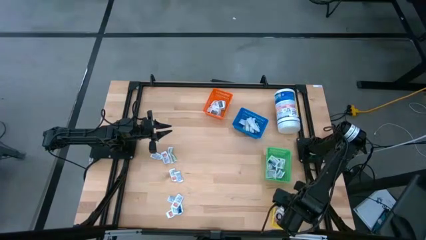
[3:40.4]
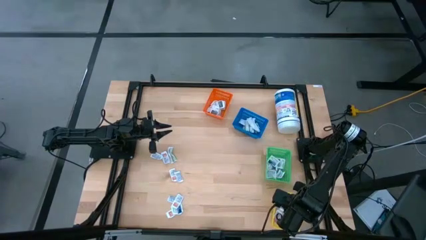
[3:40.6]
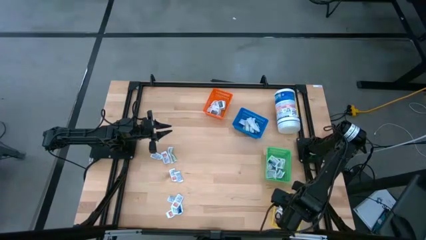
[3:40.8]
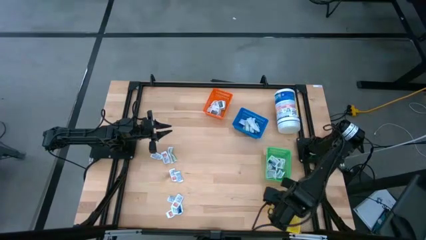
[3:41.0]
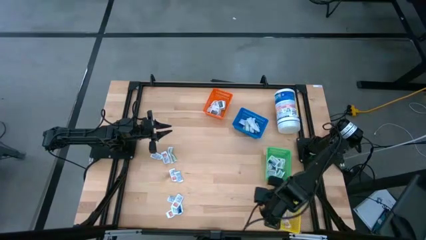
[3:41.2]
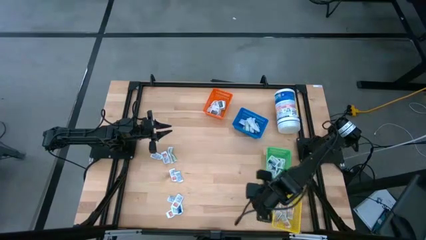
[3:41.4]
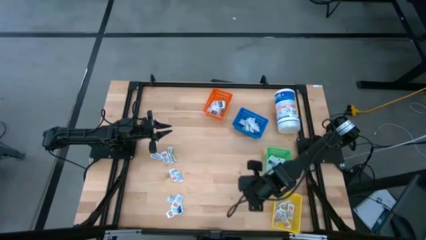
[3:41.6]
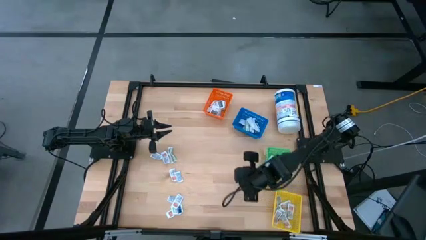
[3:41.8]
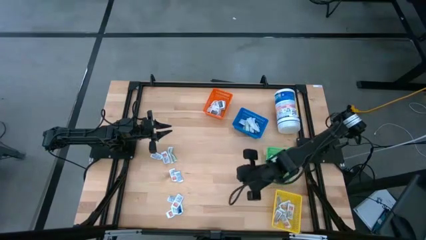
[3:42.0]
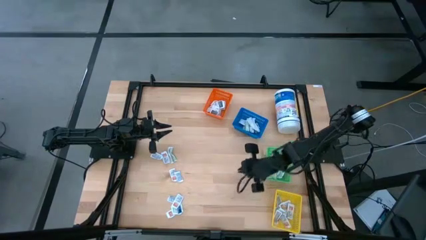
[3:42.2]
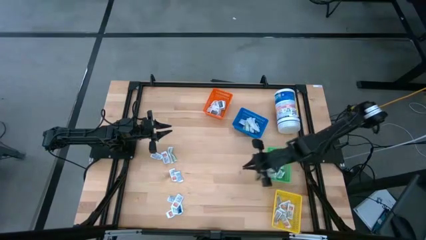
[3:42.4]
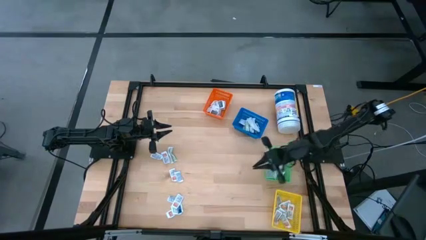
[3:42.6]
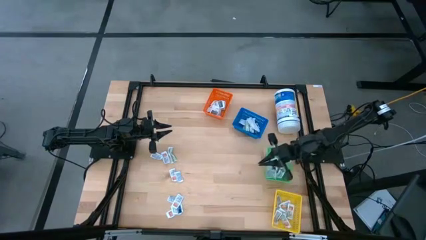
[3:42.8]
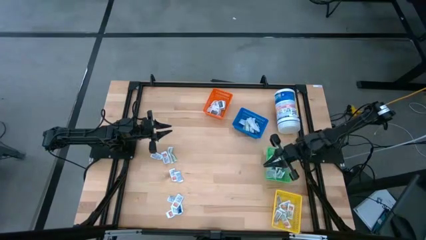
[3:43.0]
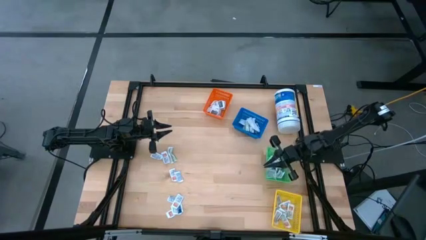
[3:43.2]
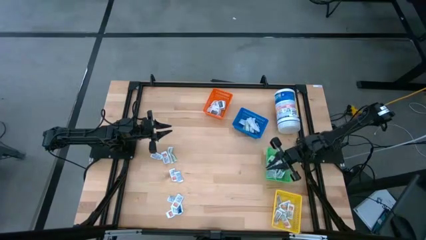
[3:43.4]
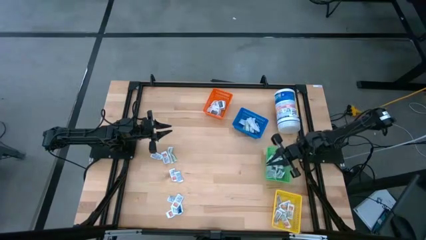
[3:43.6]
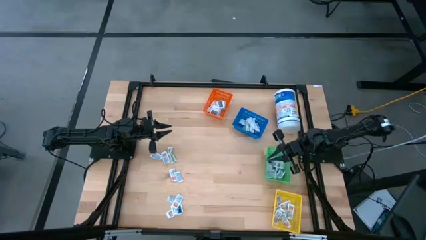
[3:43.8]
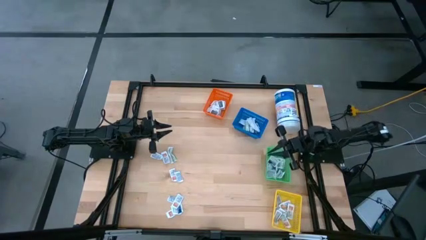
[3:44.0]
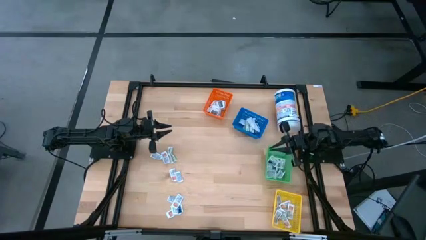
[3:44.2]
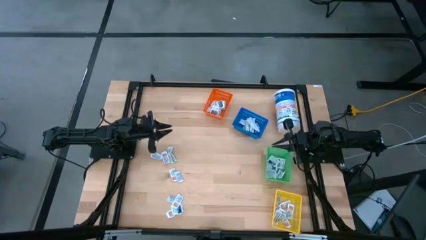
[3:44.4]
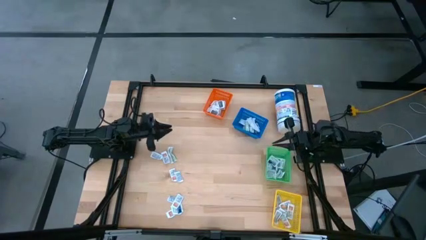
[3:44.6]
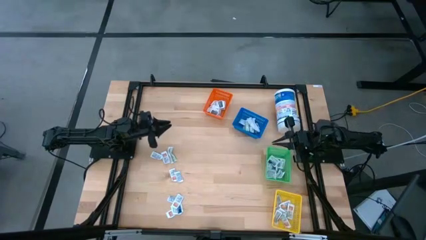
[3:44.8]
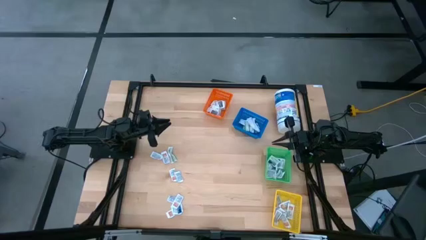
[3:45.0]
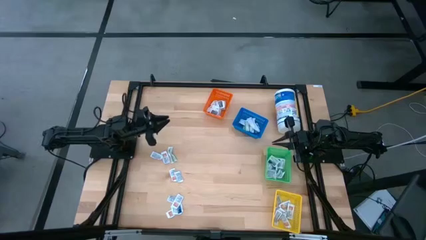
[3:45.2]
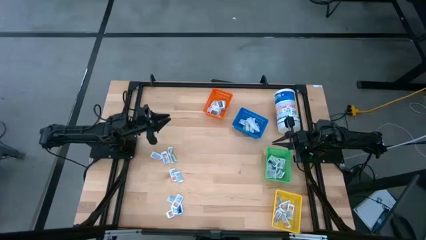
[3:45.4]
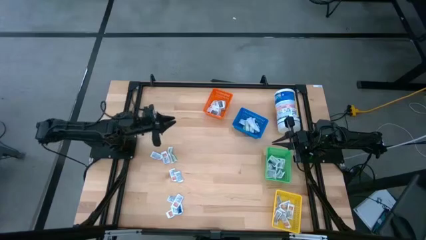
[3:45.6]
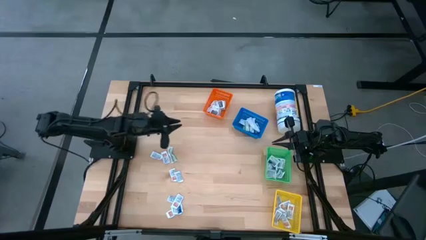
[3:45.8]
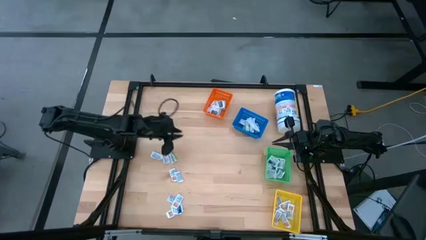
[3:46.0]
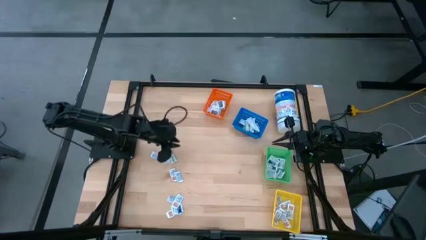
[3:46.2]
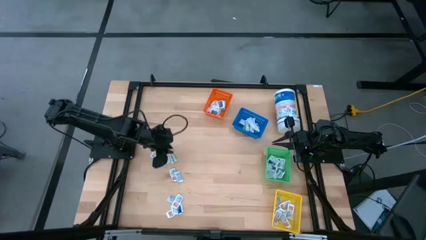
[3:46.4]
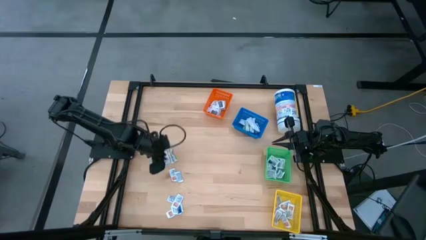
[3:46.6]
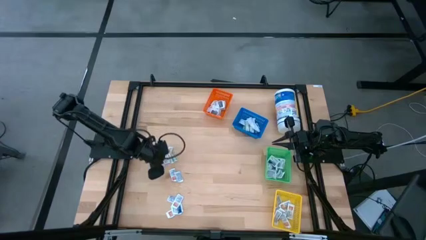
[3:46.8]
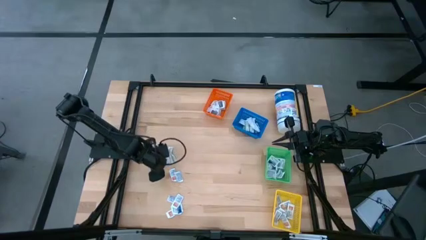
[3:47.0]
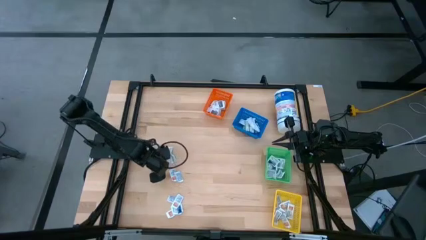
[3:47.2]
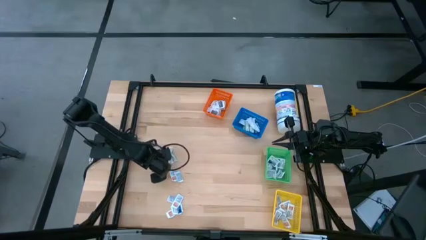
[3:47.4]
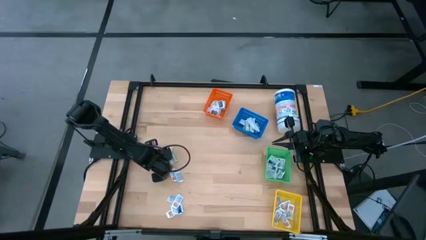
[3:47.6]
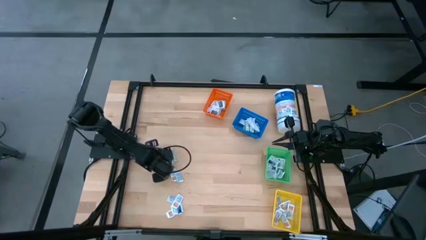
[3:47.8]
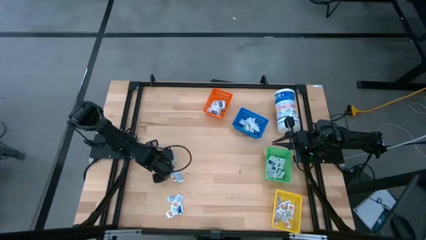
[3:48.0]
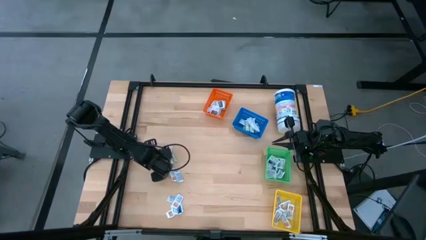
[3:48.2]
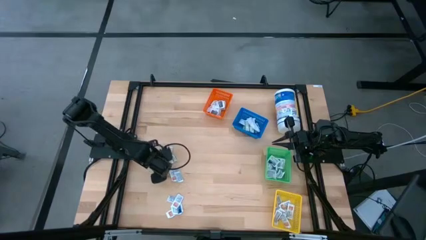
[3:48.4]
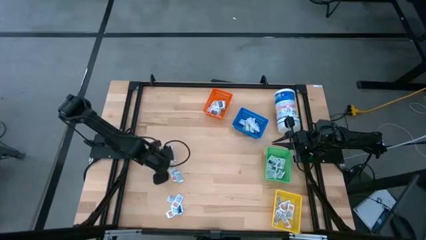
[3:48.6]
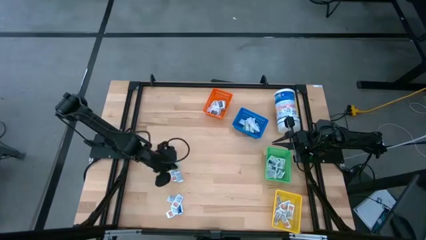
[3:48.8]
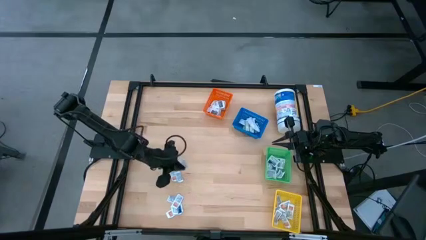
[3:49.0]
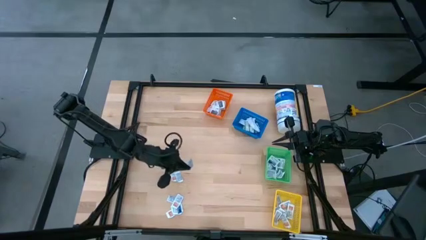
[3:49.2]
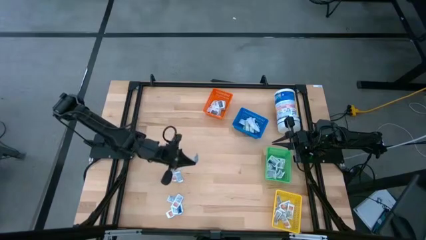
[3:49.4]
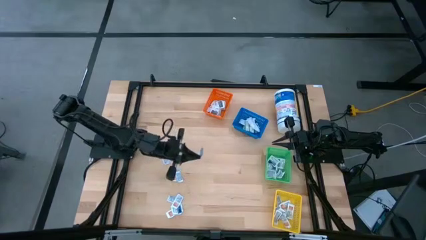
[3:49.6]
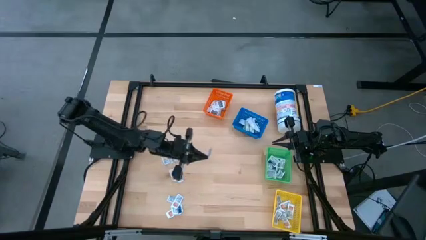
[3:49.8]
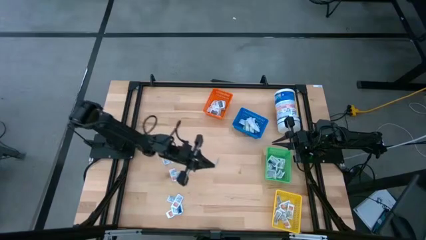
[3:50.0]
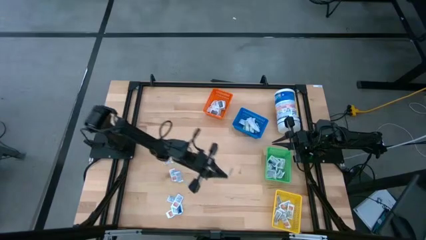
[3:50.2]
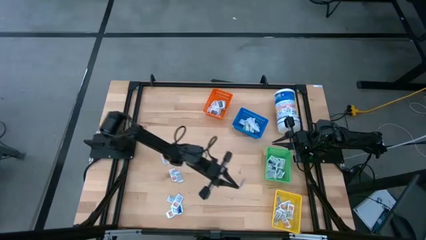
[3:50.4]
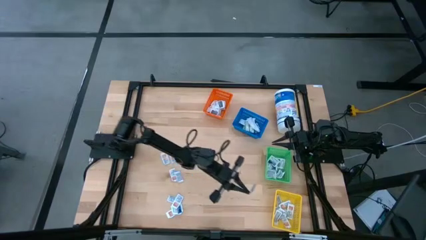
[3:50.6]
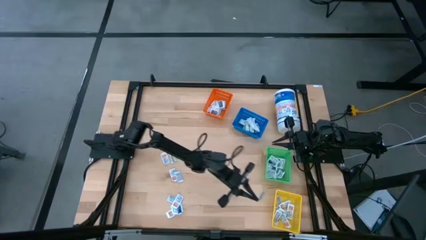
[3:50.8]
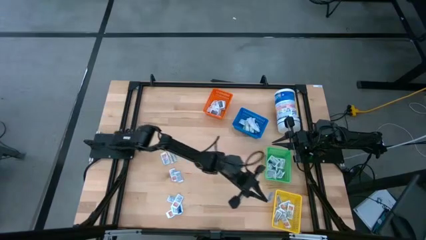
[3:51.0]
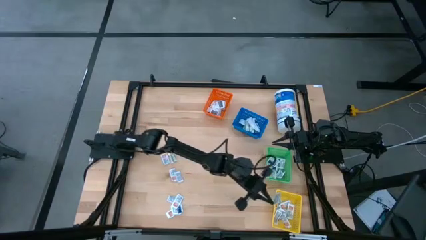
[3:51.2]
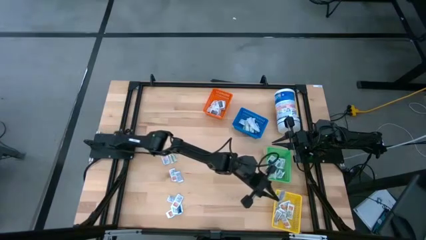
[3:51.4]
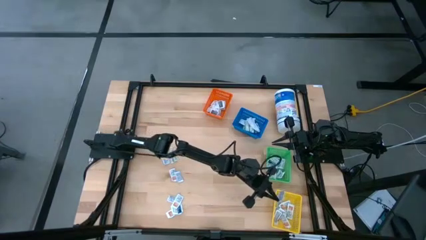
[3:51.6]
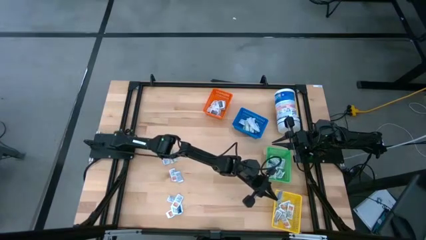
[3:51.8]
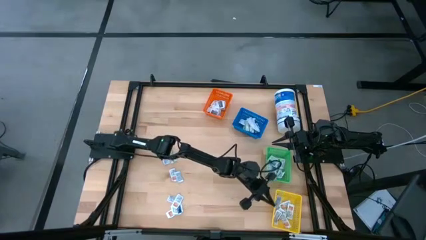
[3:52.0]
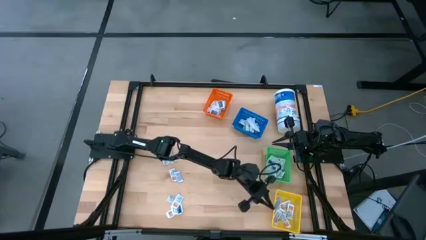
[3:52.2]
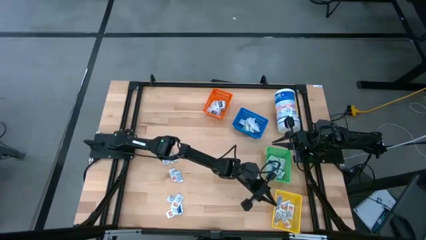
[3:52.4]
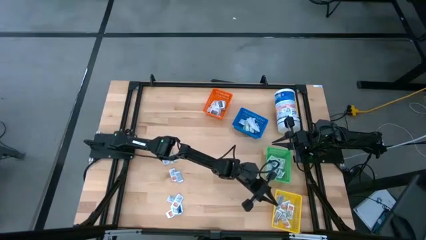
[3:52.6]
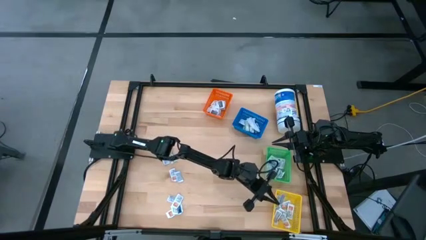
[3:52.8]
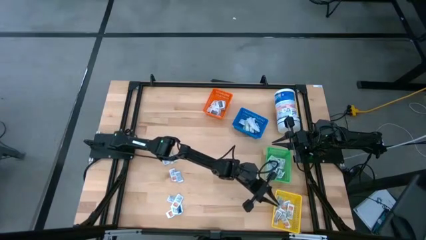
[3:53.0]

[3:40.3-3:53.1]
Task: Pick & Place First Aid Supplies
Put the orange ointment pack into the yellow basket

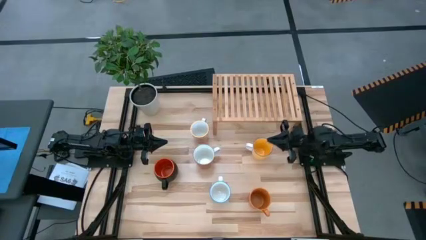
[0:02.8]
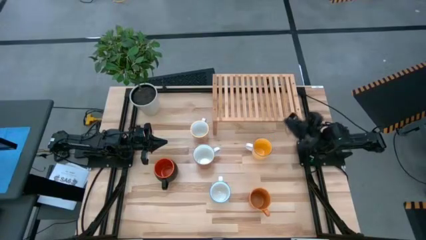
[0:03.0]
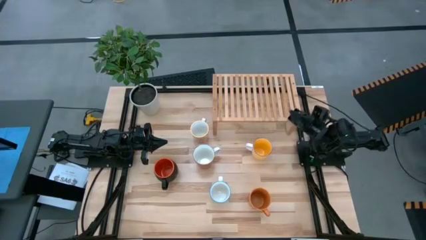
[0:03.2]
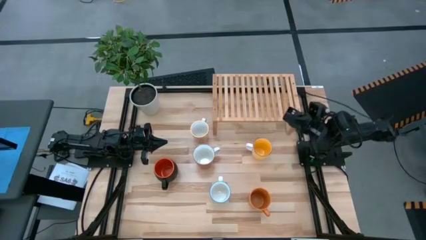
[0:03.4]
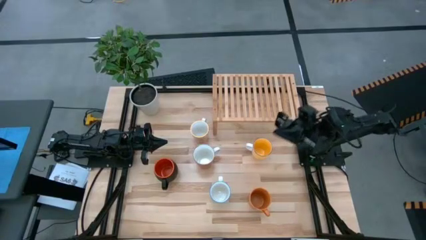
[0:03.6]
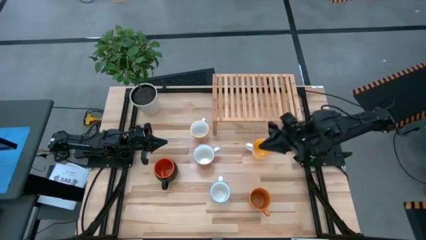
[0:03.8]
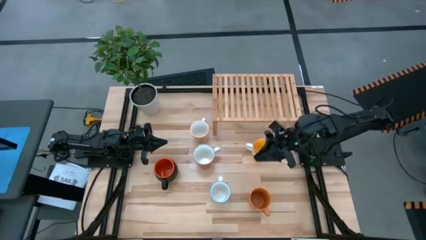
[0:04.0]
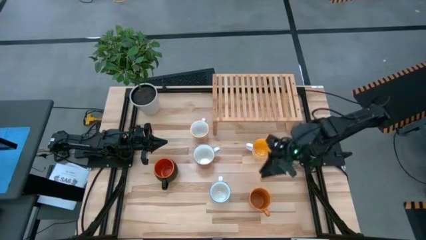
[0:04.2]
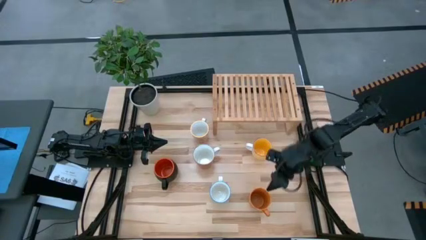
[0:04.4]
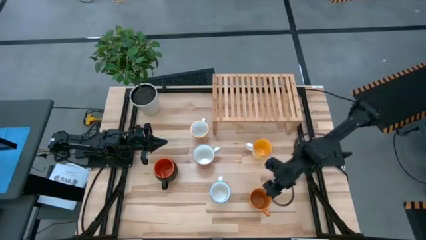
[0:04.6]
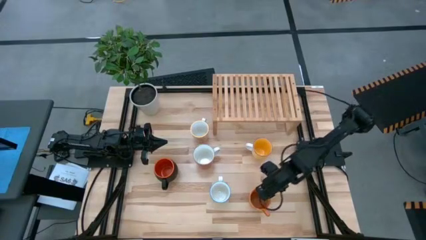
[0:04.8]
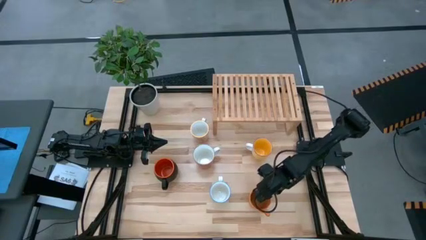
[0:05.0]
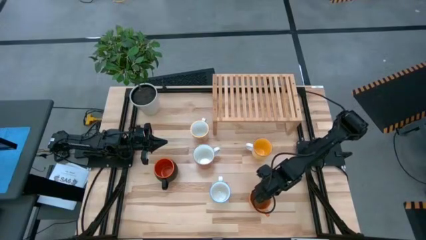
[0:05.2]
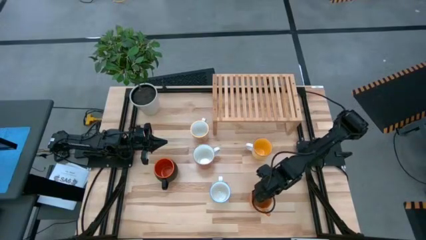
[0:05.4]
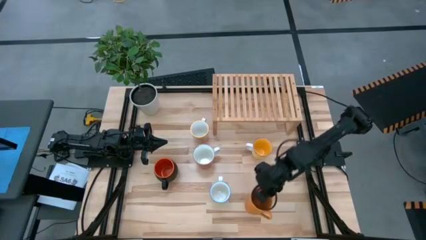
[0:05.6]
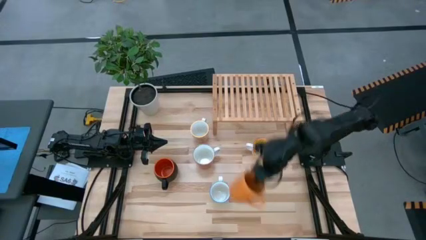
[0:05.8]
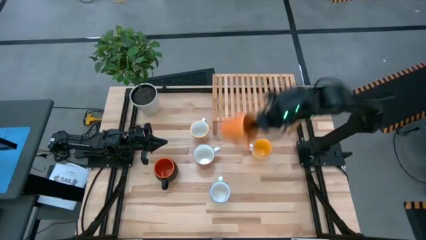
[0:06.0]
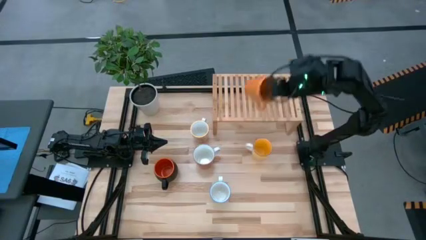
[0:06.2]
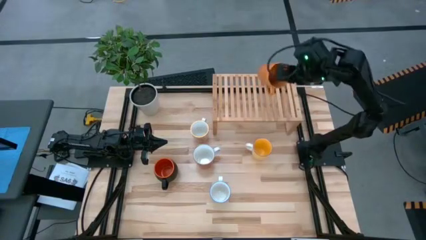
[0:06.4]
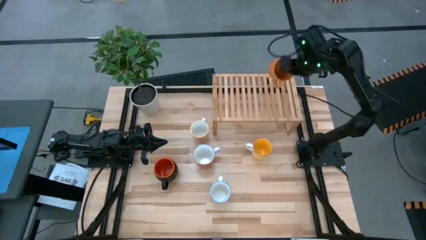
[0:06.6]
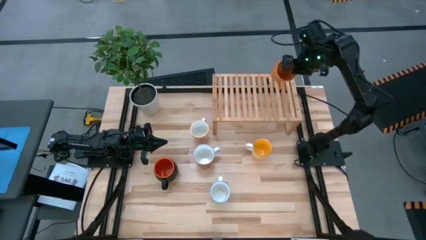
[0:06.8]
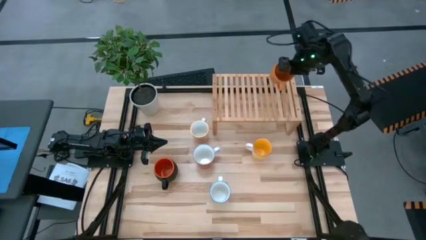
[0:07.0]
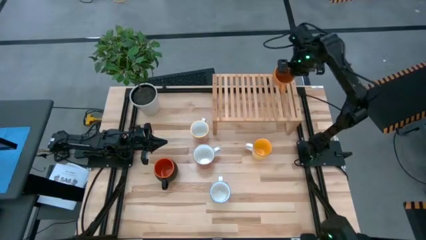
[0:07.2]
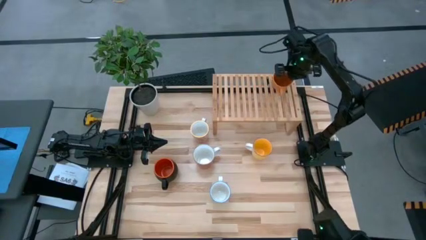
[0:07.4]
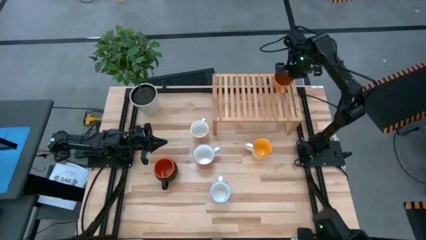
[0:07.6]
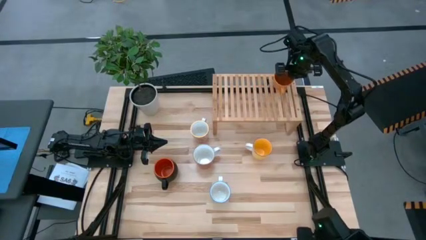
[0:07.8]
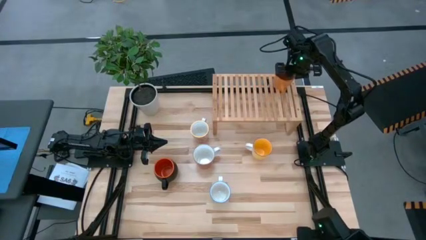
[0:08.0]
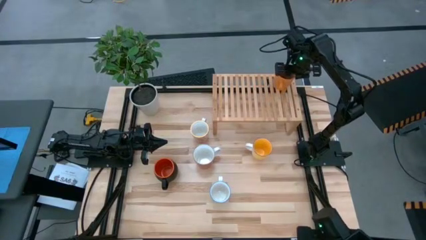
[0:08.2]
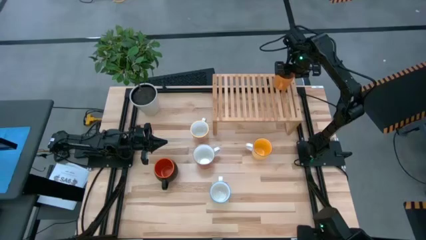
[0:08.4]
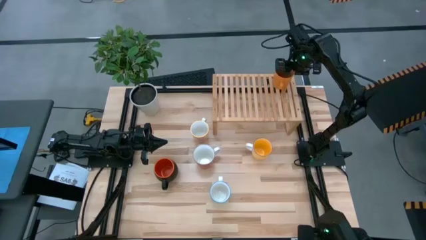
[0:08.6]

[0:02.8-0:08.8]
Task: Place coffee mugs
Put the orange mug on the shelf
